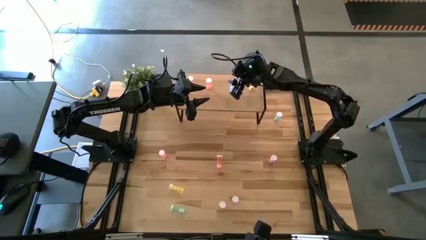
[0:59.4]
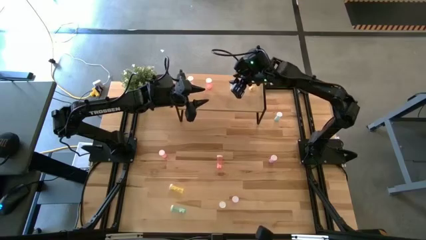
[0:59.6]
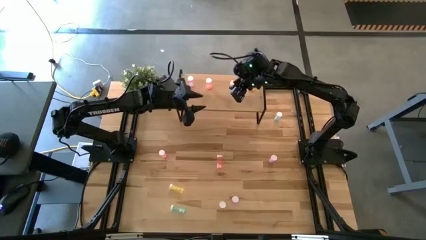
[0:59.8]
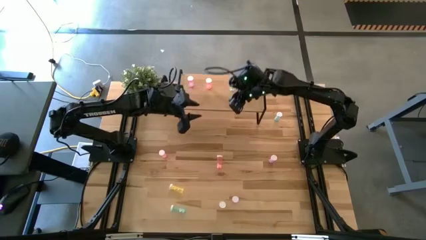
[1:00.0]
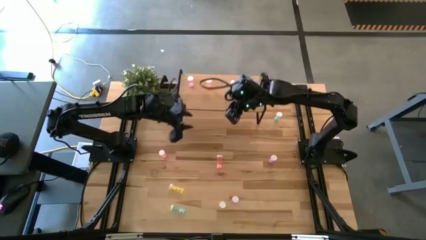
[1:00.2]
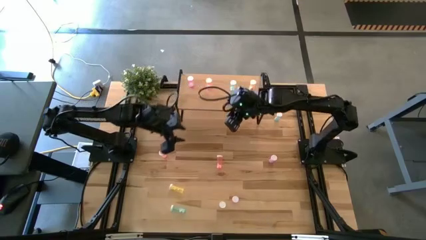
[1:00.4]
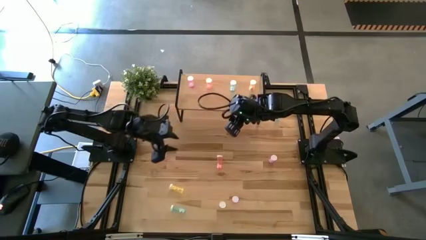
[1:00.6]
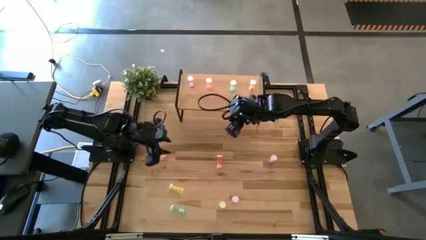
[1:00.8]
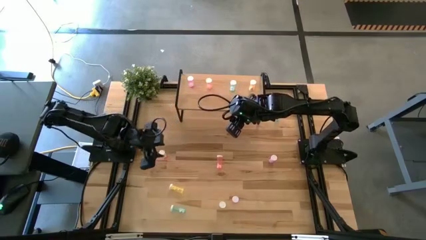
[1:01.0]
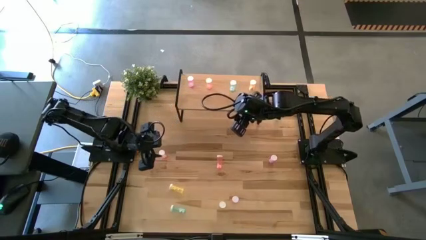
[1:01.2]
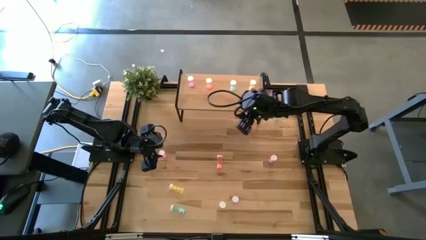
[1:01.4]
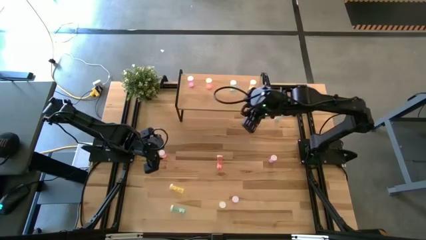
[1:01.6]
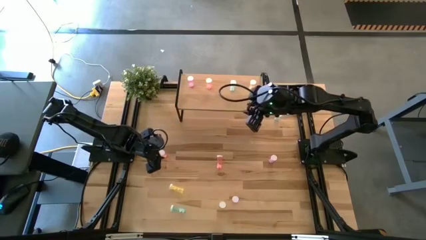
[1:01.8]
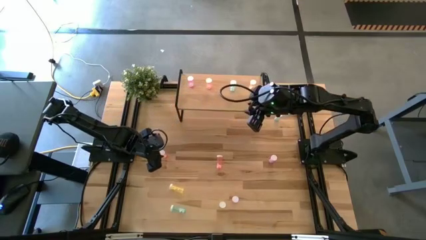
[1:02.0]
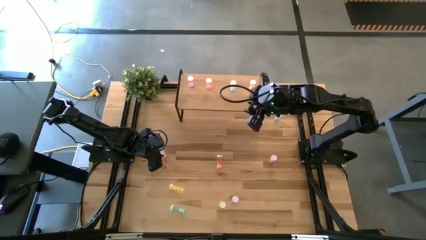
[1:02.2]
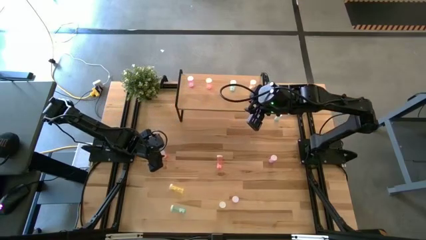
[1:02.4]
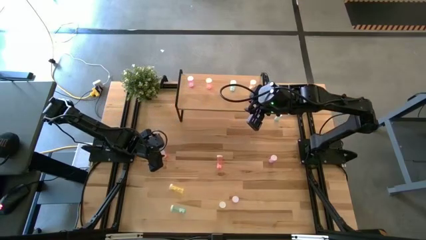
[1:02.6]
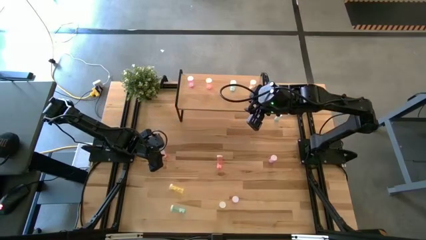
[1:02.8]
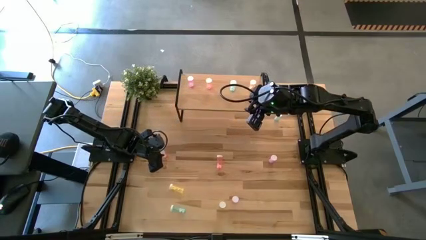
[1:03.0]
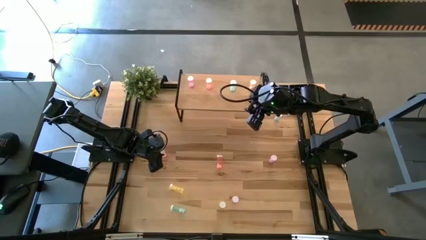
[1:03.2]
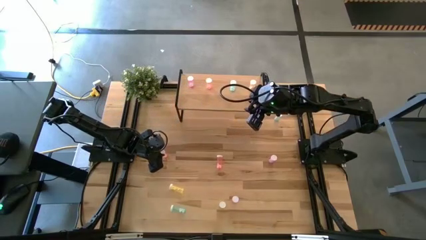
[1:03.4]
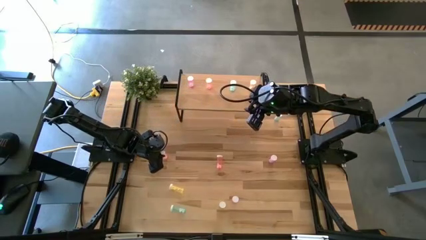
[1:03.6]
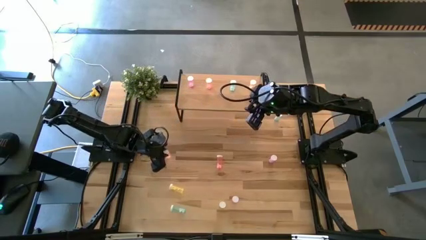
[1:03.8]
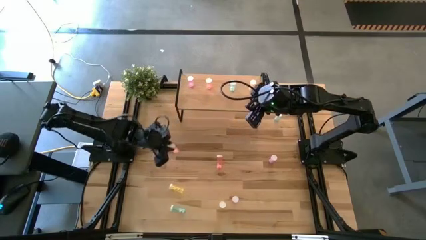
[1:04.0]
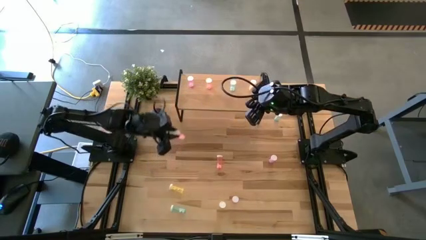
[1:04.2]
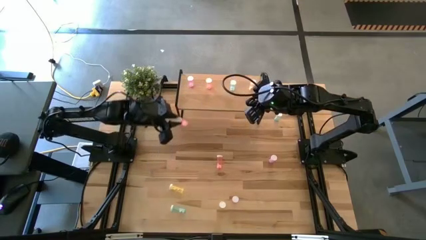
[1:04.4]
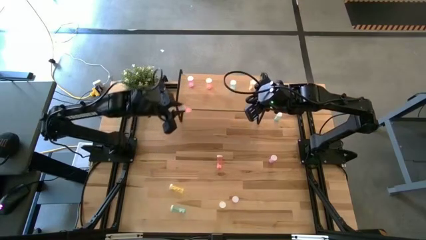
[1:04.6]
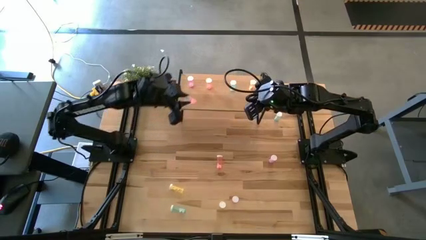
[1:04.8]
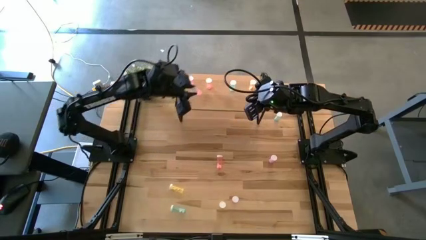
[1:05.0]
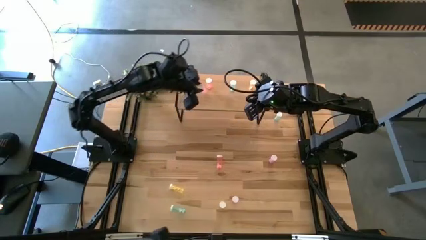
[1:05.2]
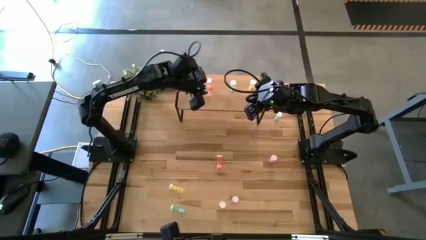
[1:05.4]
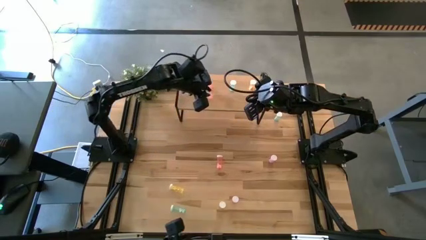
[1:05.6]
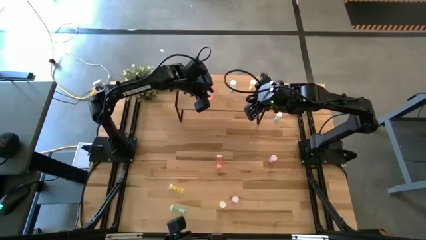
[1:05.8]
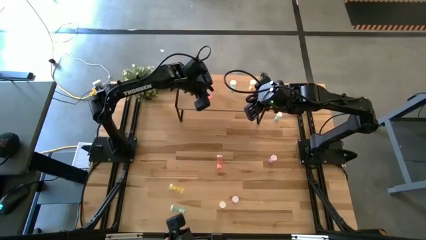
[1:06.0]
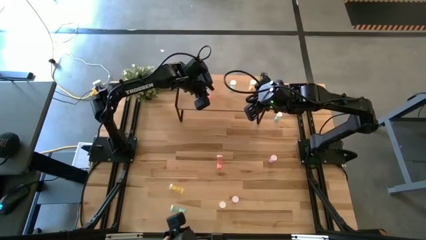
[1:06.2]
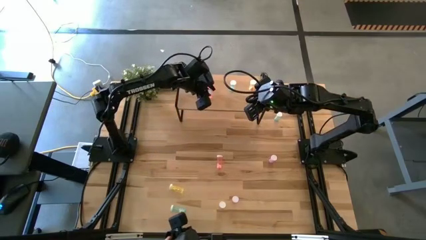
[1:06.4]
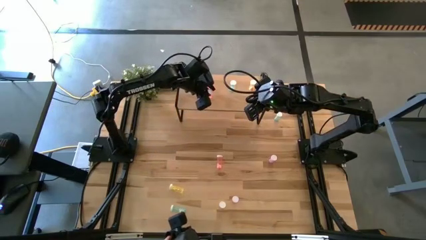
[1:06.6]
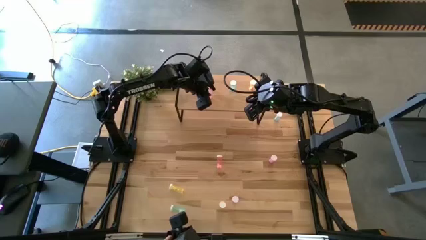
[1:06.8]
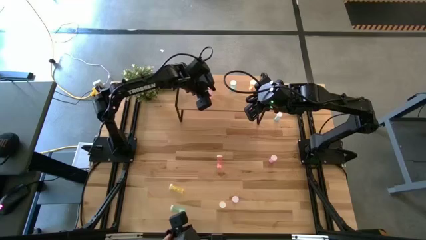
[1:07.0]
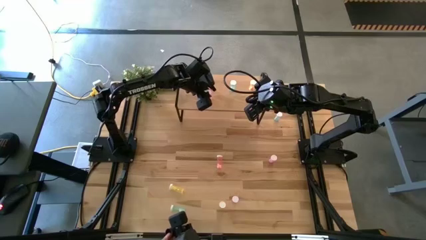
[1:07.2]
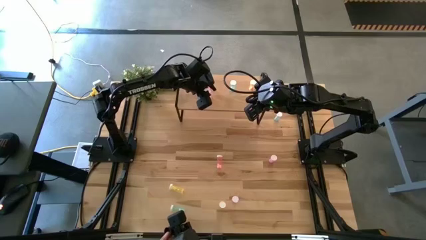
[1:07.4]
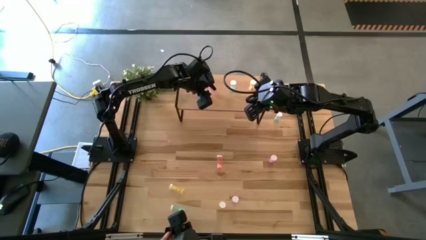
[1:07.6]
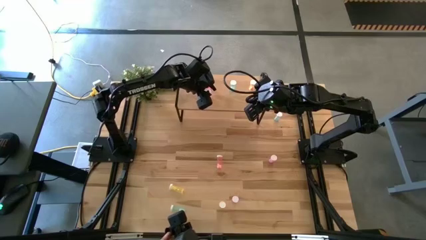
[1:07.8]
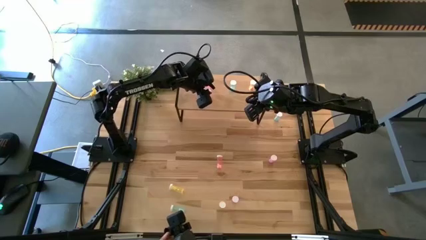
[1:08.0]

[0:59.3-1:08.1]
Task: Pick and place medicine bottles onto shelf by color
Put the left orange bill bottle on the shelf aligned with the other orange pill bottle

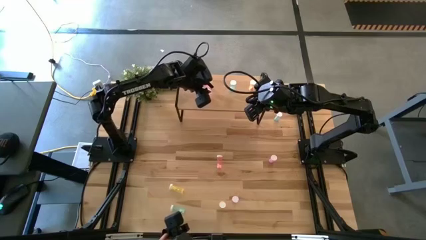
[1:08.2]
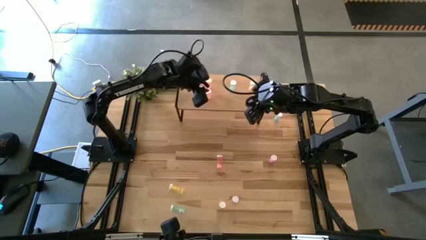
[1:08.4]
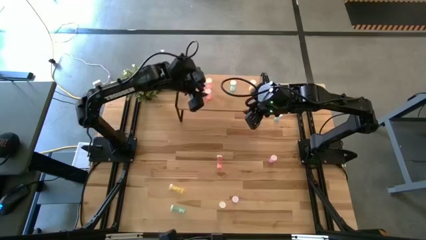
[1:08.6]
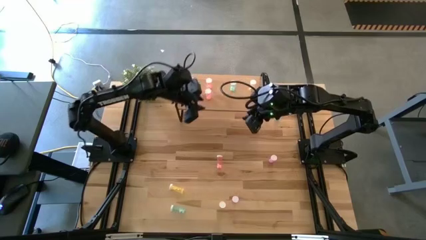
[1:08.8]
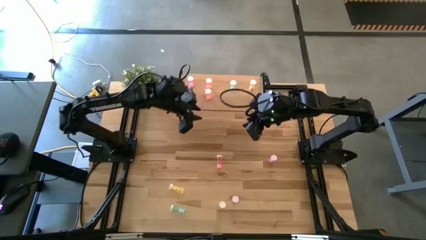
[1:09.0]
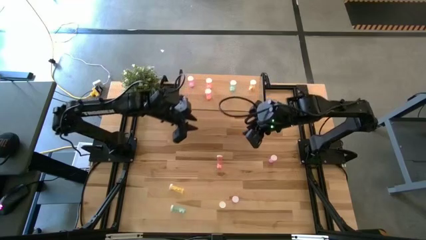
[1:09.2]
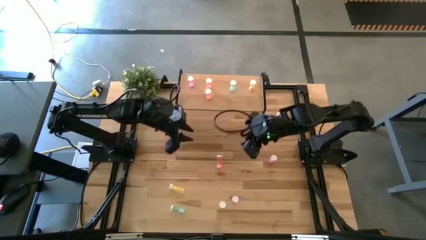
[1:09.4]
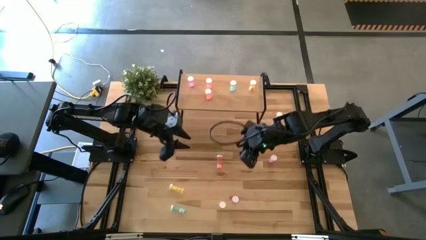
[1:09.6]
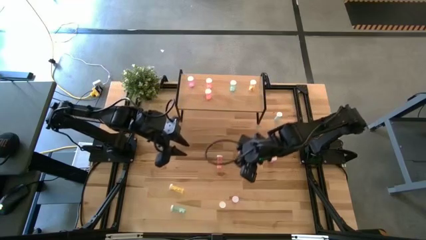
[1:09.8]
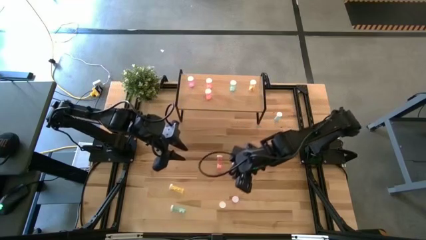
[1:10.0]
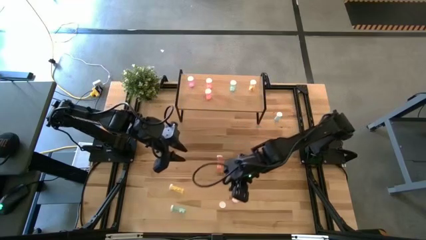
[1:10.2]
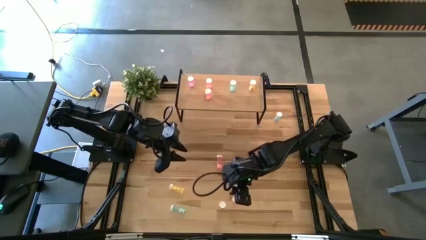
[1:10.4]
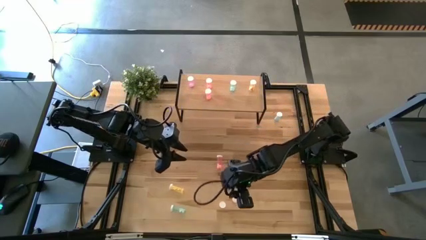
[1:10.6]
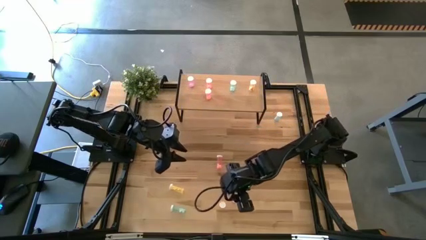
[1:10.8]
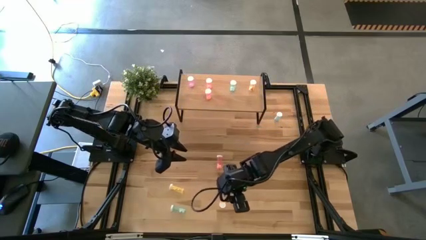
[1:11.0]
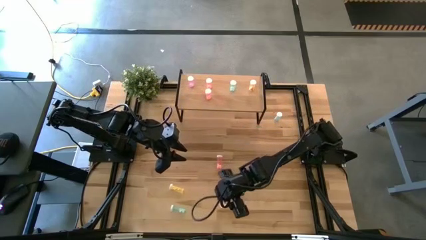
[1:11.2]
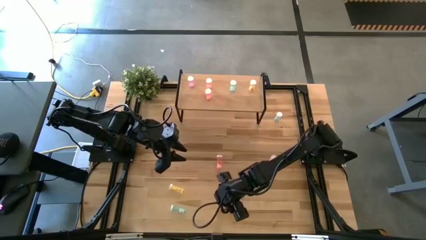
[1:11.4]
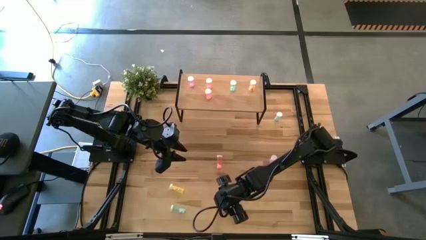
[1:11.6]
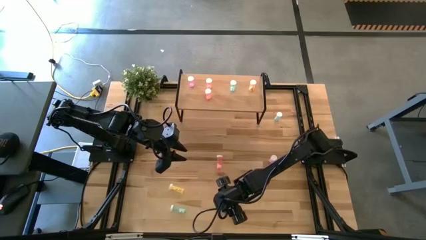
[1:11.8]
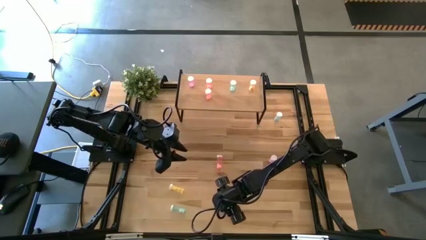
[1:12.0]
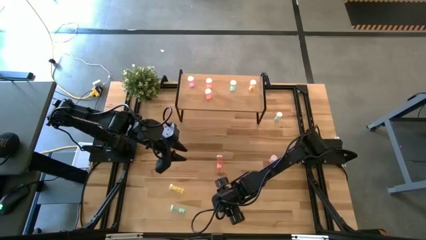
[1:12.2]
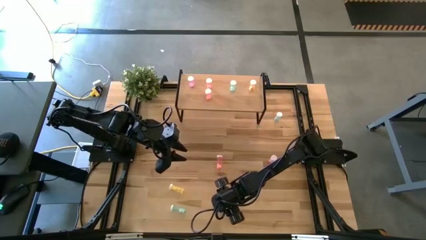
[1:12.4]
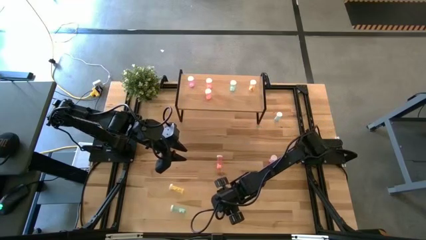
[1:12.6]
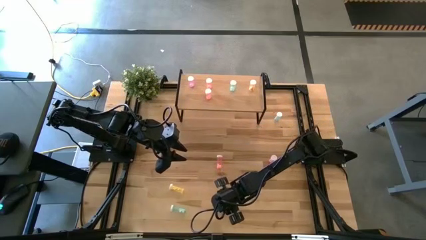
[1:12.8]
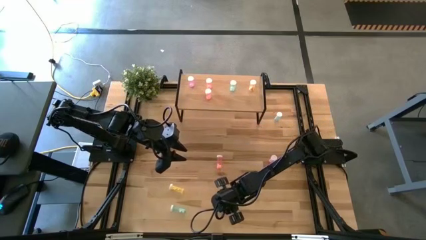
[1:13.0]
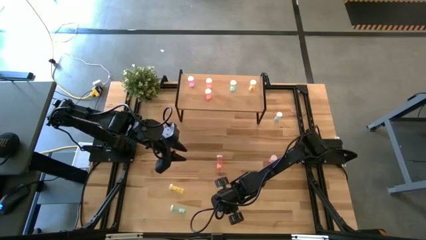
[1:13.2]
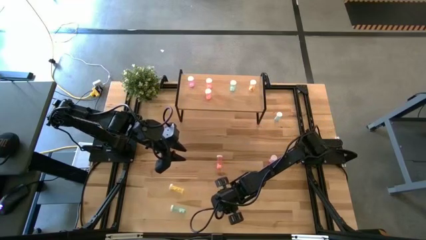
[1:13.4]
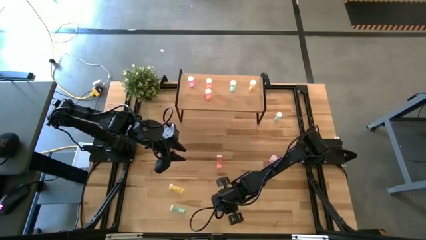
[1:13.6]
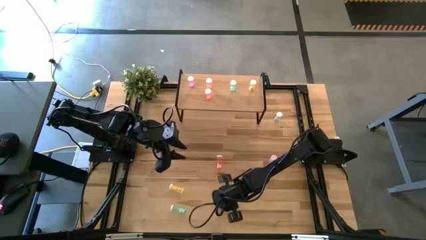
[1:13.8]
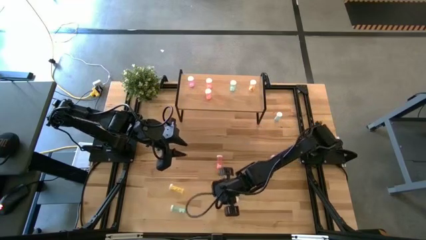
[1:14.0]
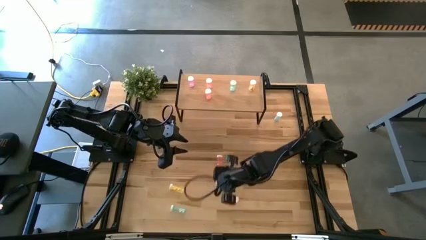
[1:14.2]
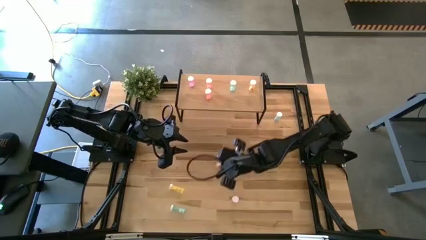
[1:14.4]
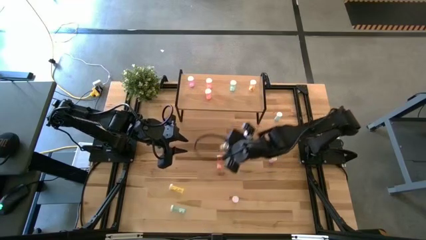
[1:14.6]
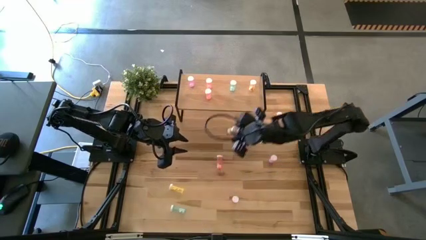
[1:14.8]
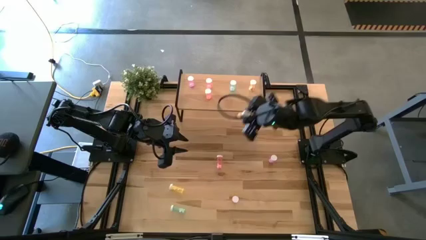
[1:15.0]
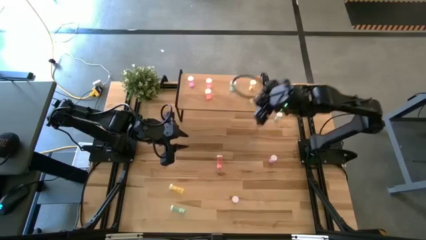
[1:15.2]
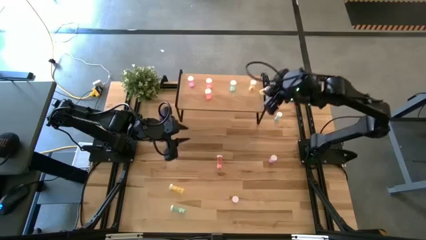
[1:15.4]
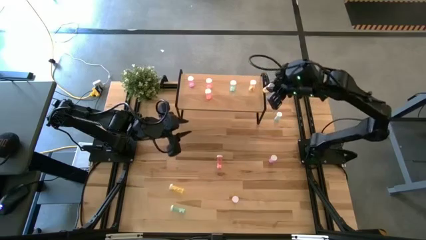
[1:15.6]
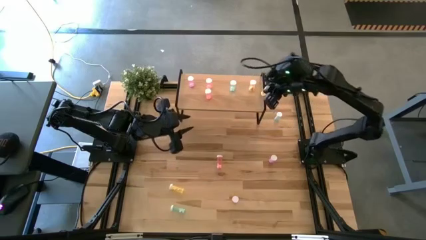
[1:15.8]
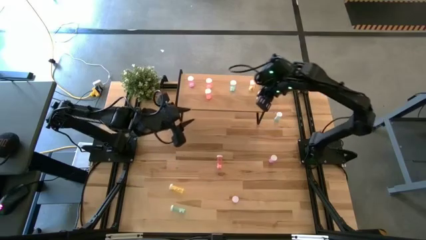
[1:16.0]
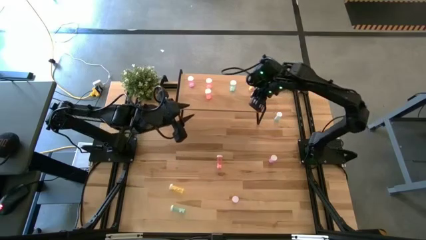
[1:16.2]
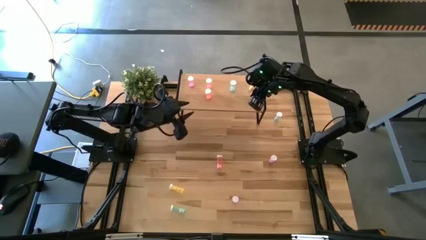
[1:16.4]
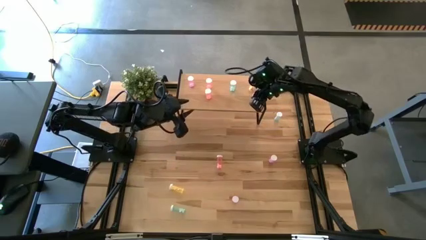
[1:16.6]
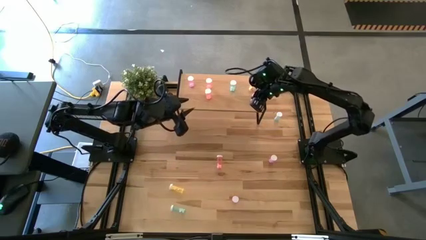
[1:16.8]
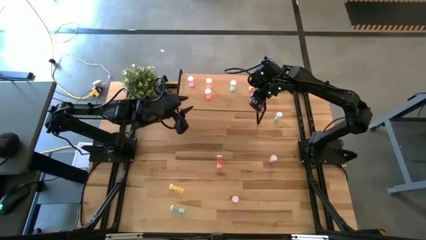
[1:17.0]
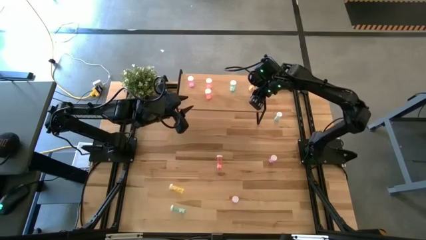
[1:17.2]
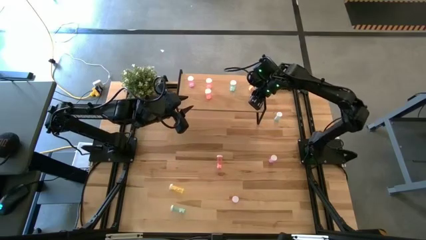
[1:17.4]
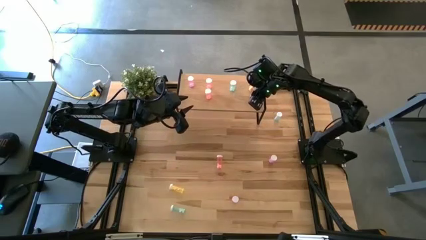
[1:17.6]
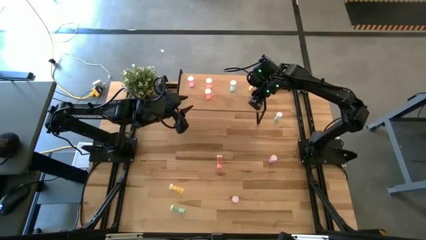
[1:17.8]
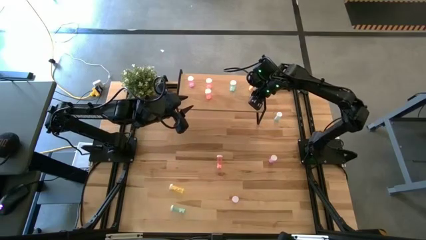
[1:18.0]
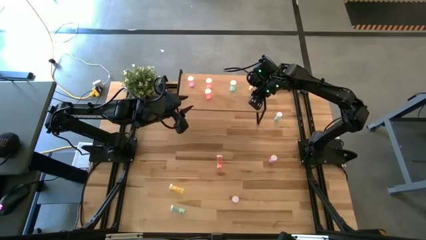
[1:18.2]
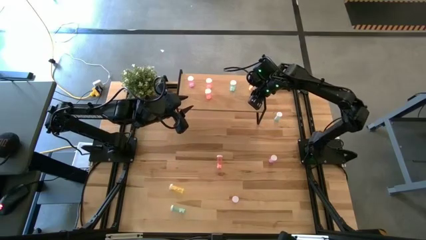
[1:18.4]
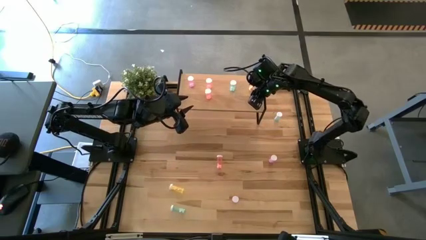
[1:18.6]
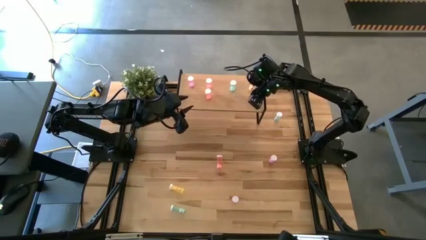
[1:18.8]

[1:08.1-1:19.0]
Put the right yellow bill bottle on the shelf aligned with the other yellow pill bottle
